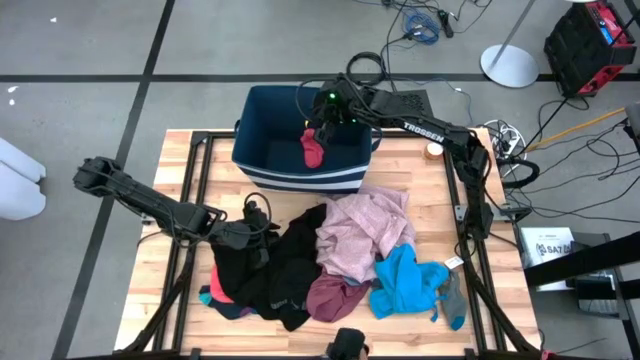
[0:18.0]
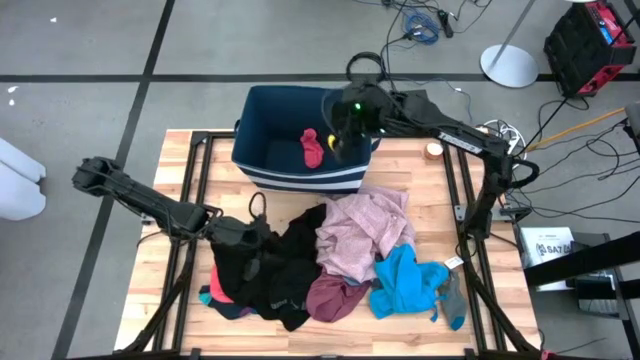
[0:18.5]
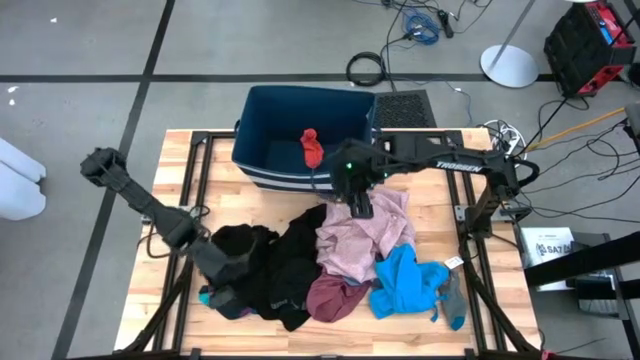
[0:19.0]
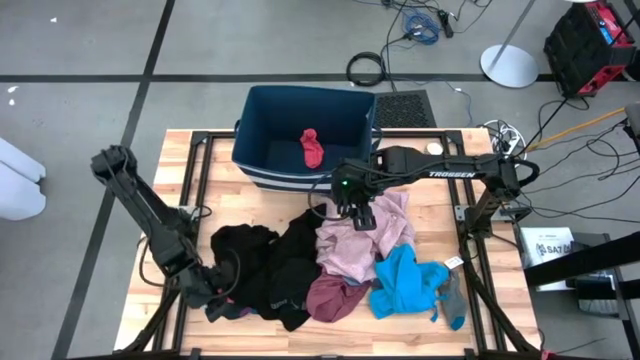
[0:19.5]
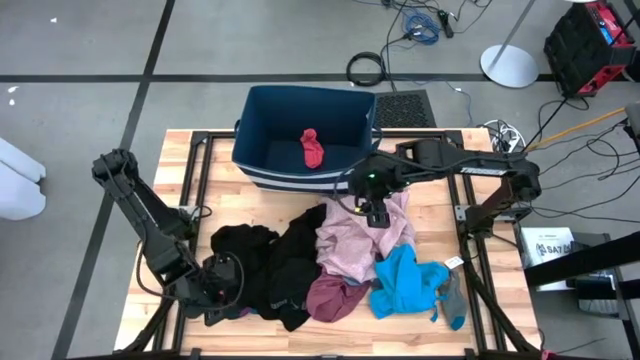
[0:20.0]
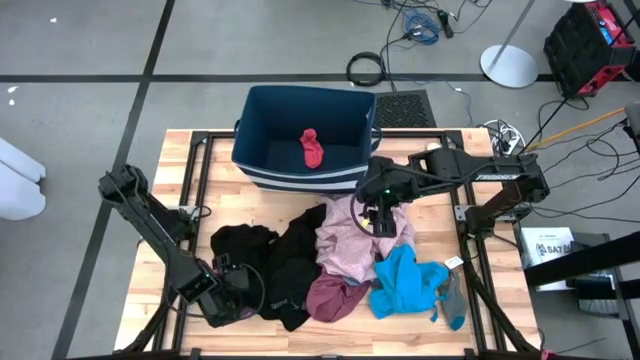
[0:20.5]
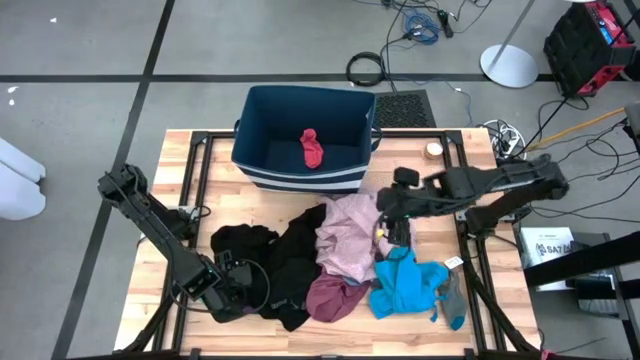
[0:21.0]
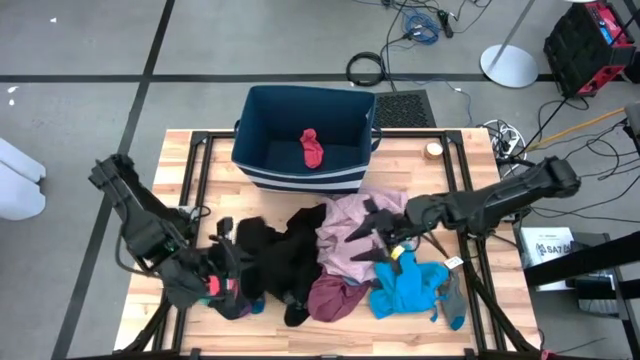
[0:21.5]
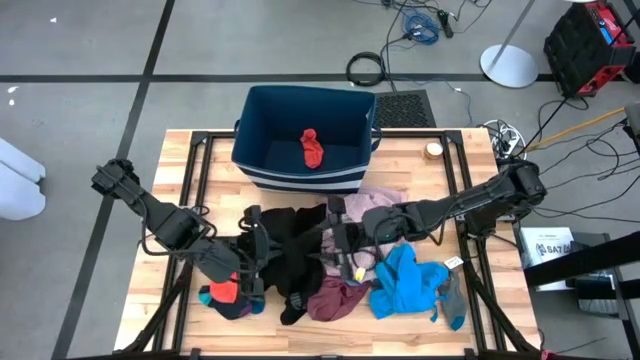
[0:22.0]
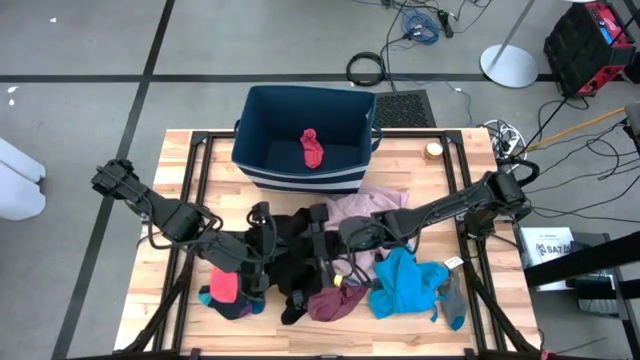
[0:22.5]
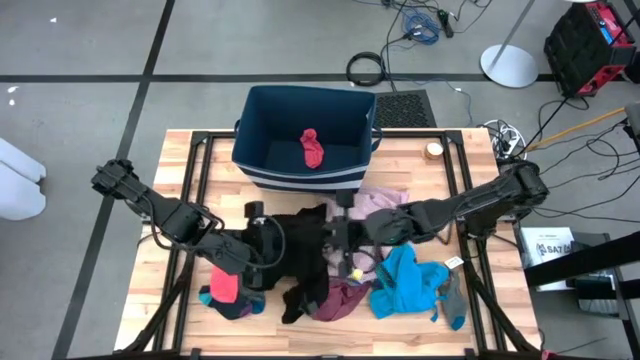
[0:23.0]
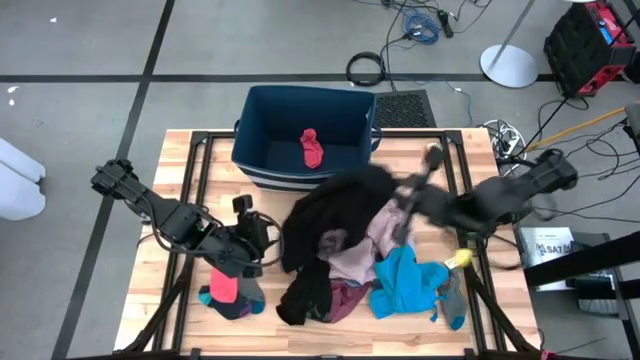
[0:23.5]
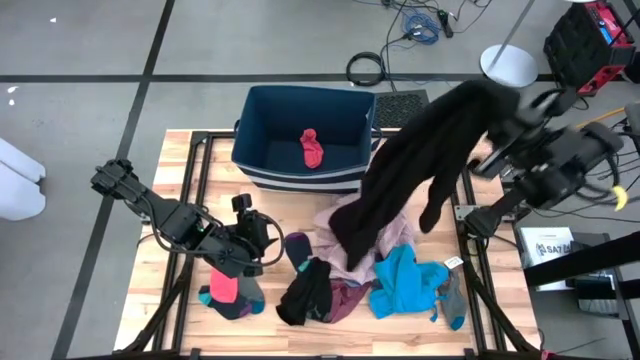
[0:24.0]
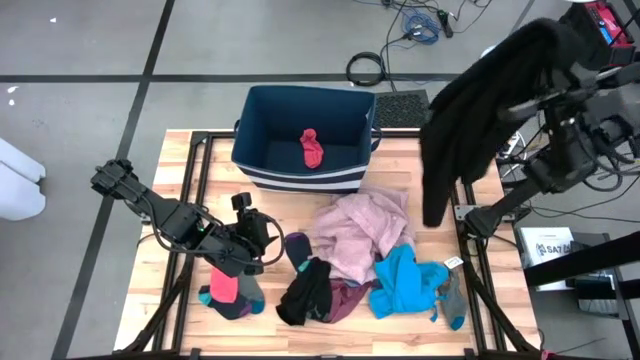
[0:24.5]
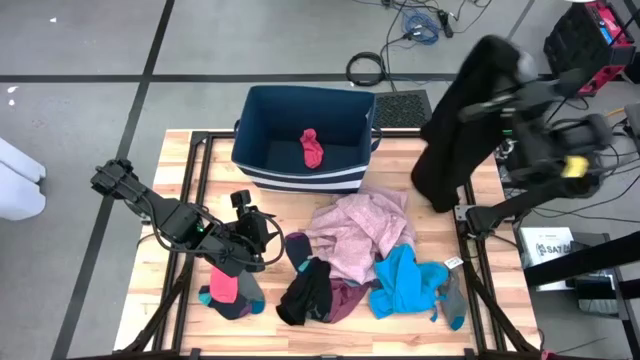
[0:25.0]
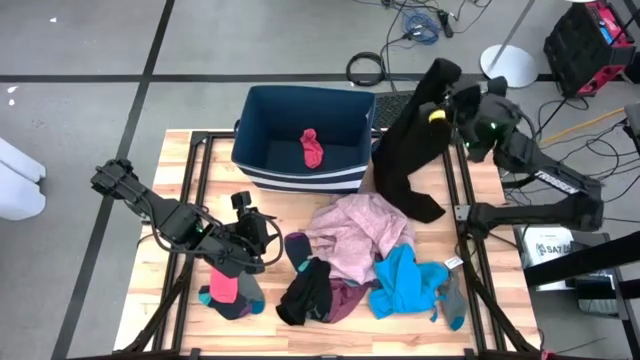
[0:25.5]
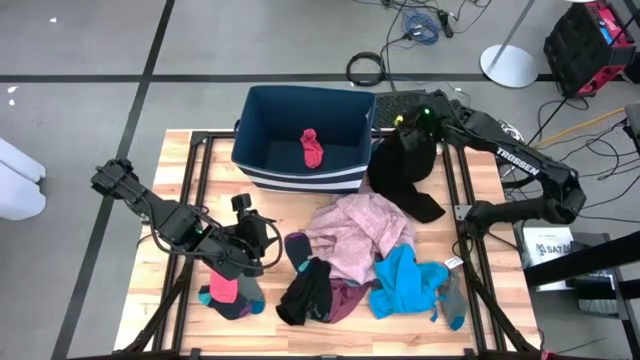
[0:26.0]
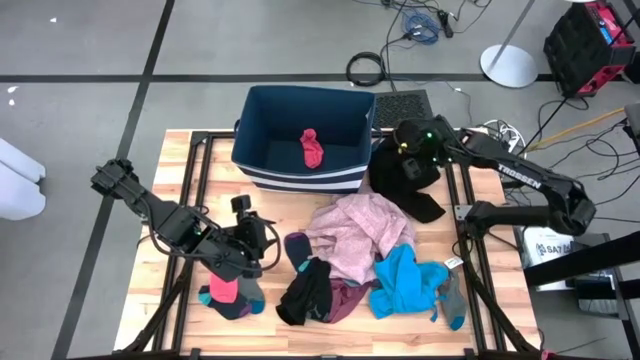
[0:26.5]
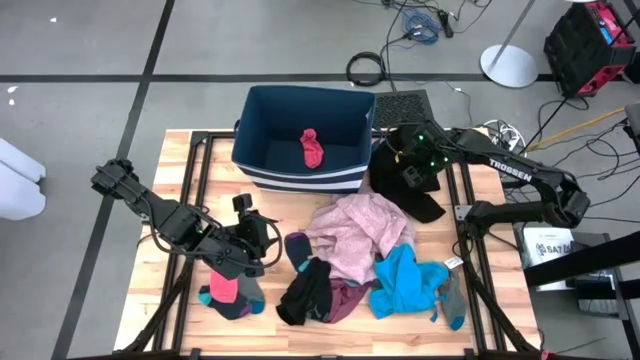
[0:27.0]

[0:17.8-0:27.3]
Task: Sort clothes
Move the black hoodie to the top right of the table

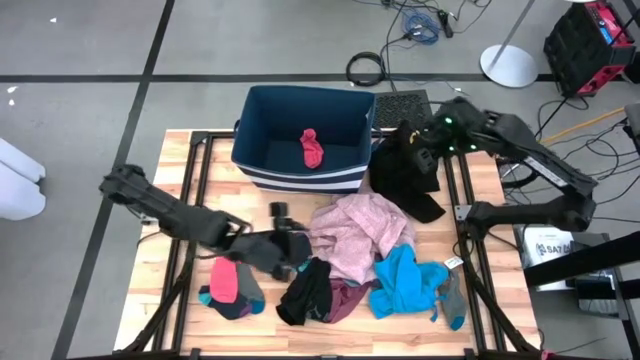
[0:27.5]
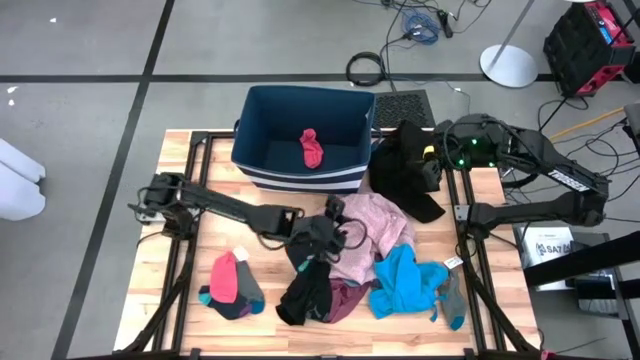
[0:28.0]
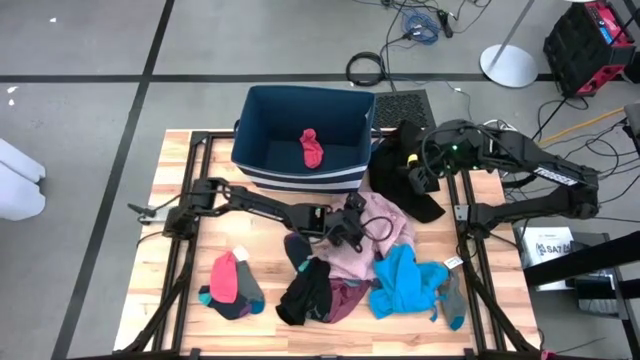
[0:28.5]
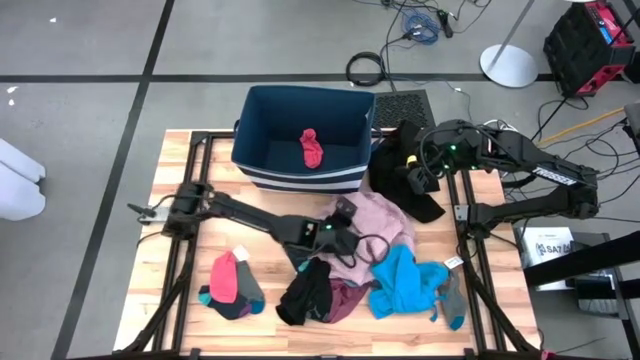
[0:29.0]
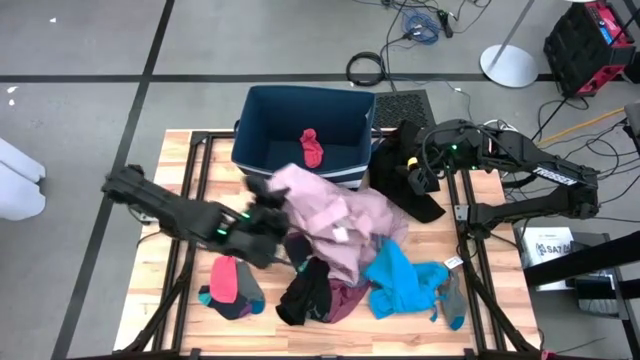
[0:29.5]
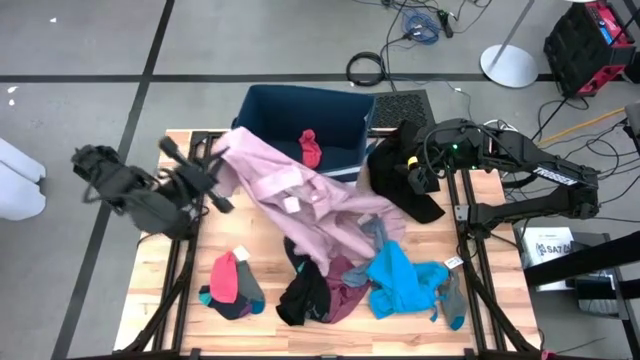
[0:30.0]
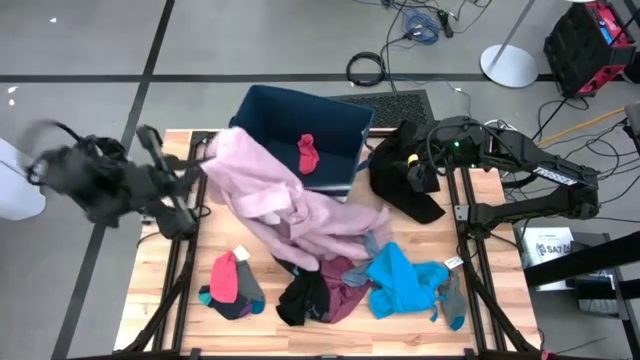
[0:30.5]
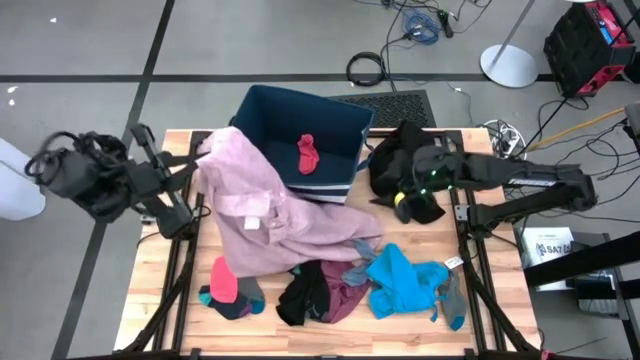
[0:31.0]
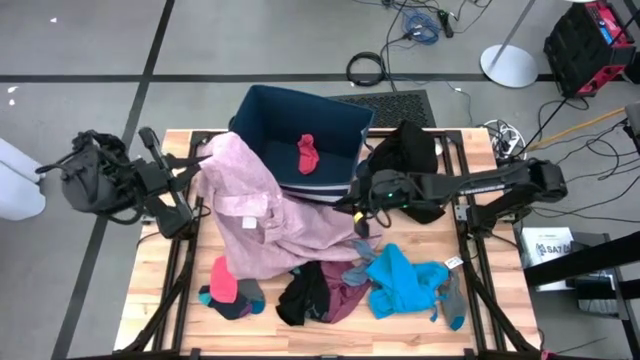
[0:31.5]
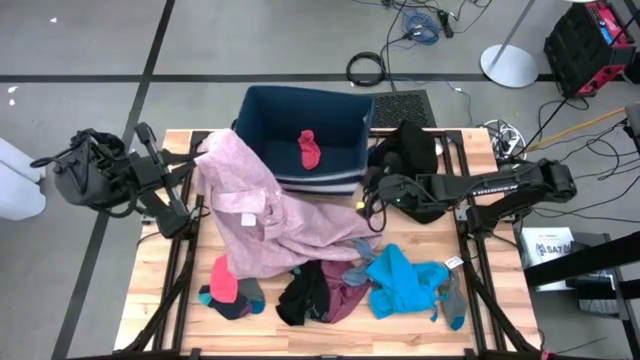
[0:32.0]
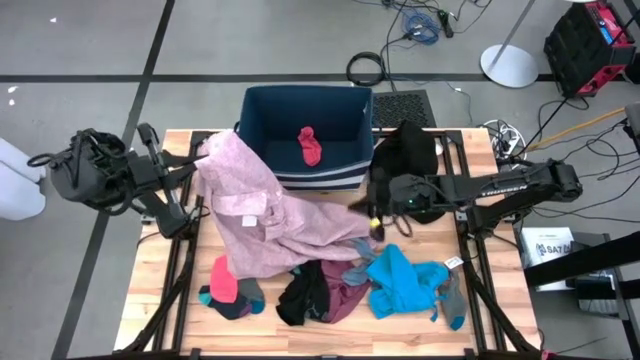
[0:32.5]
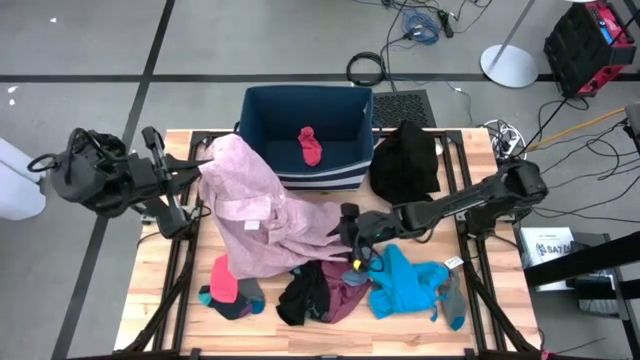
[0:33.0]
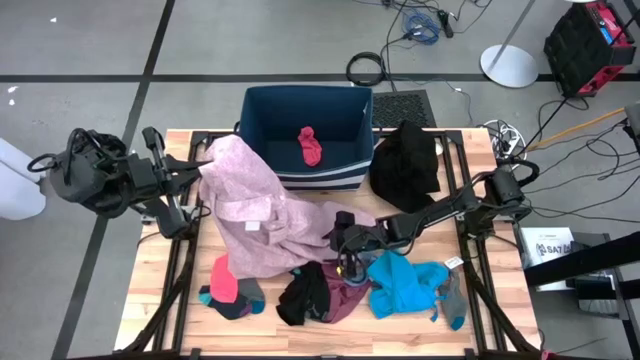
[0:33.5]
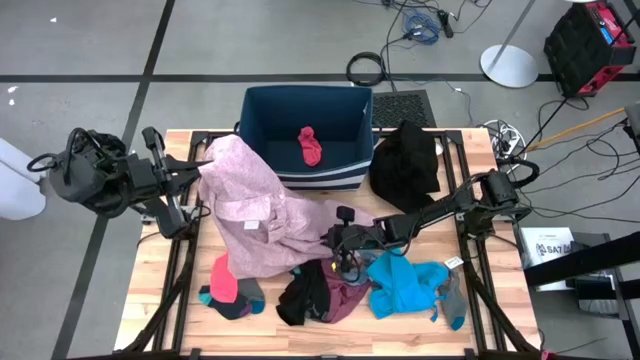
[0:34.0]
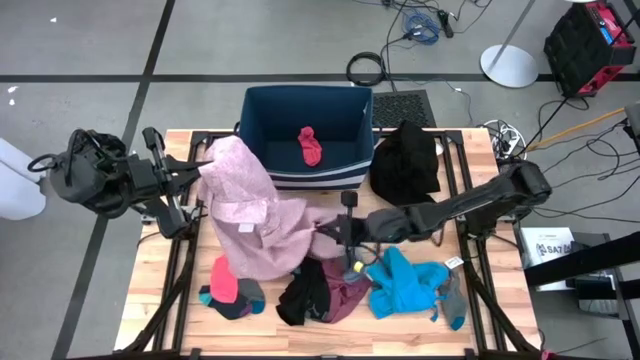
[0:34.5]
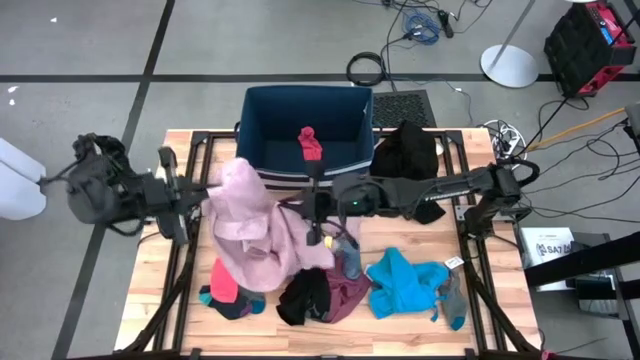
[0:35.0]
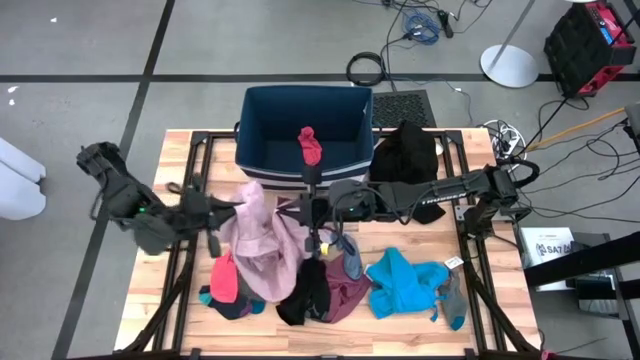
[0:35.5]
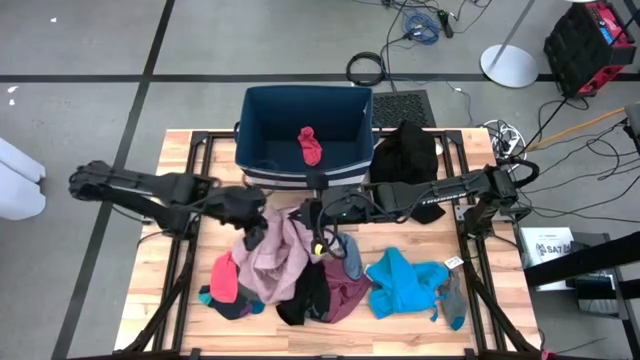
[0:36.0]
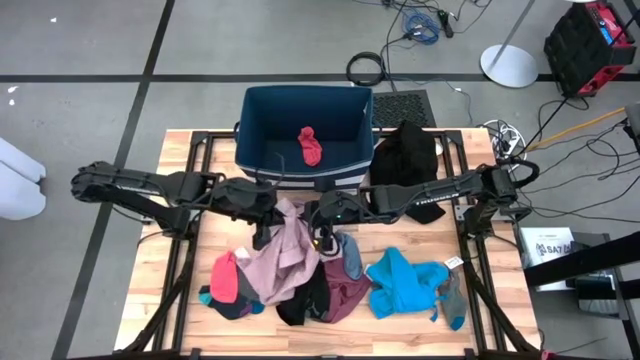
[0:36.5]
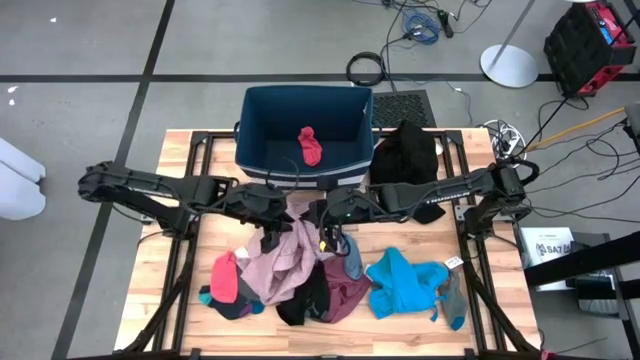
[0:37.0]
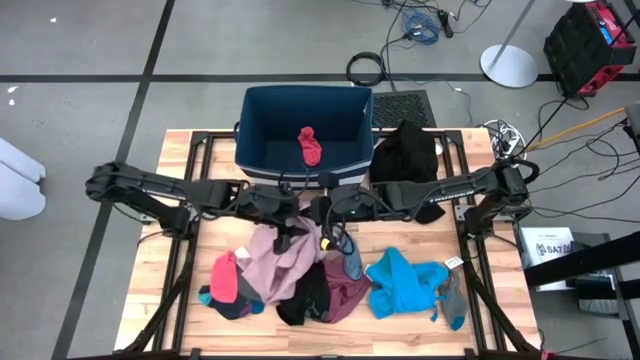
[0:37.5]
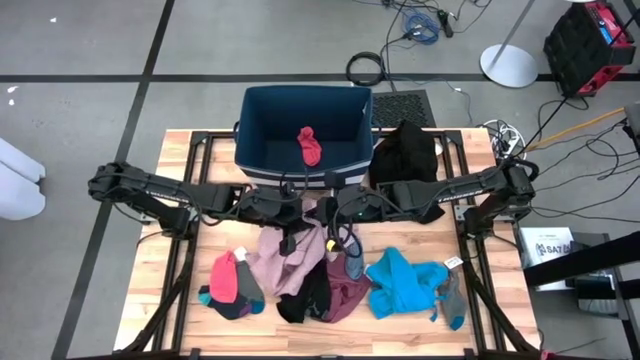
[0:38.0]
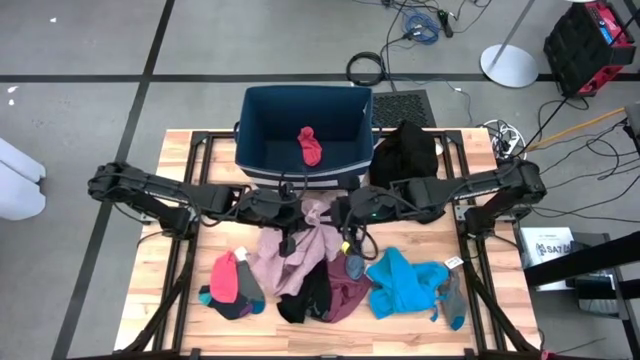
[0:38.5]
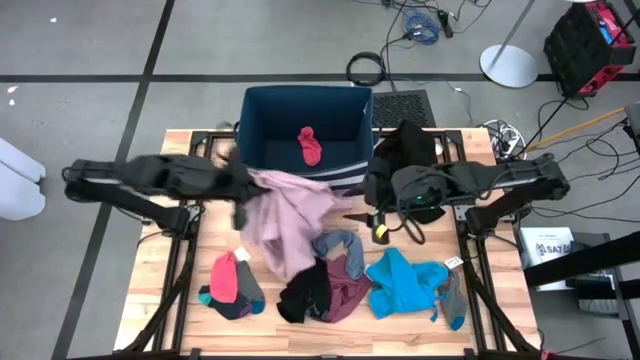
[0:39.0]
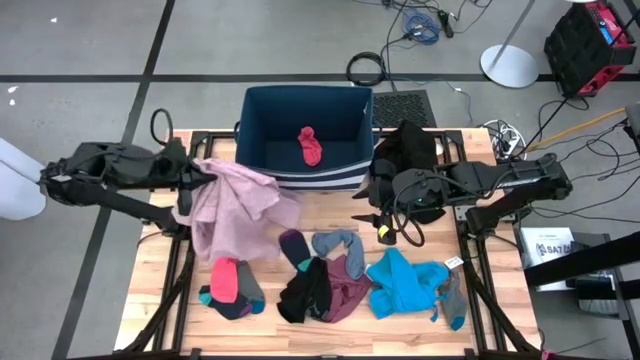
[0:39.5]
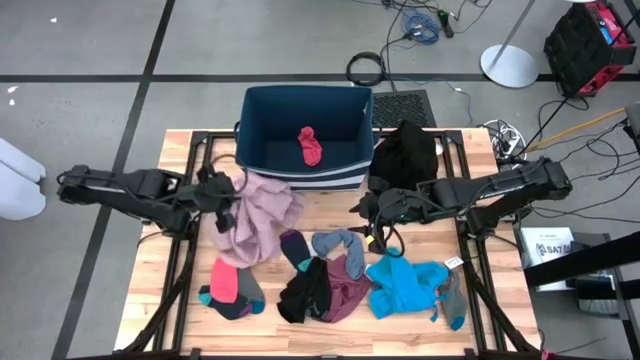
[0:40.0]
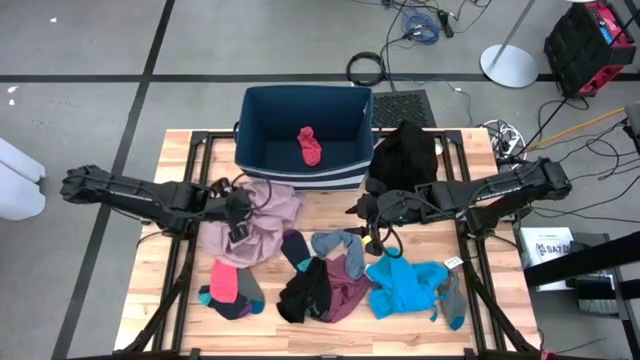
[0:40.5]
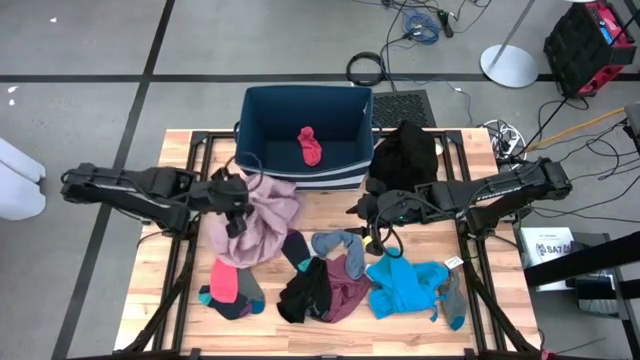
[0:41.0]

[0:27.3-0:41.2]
Move the pink polo shirt to the top left of the table
